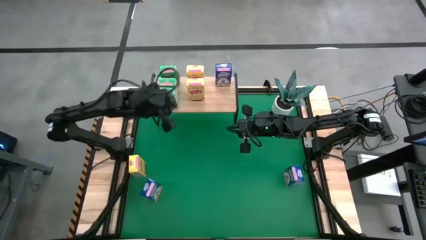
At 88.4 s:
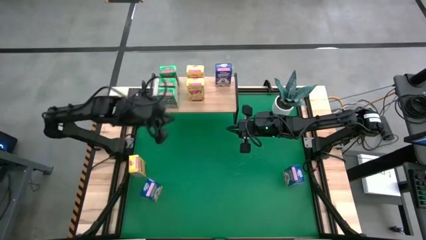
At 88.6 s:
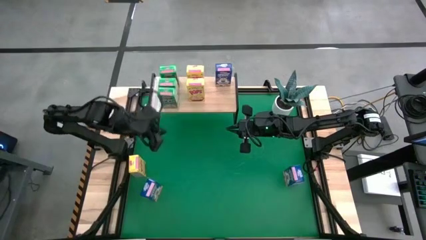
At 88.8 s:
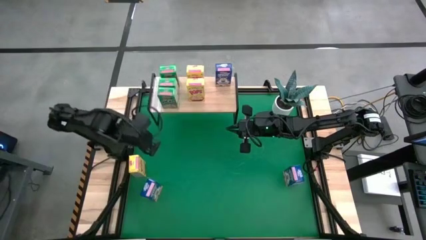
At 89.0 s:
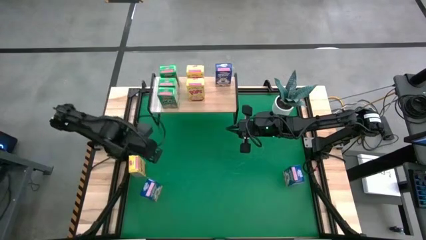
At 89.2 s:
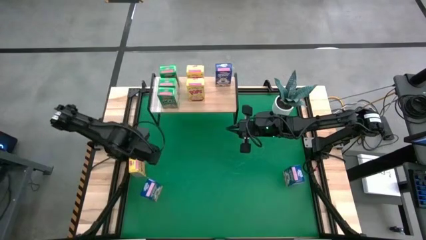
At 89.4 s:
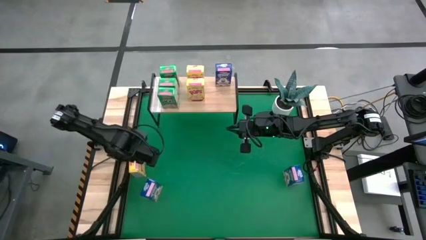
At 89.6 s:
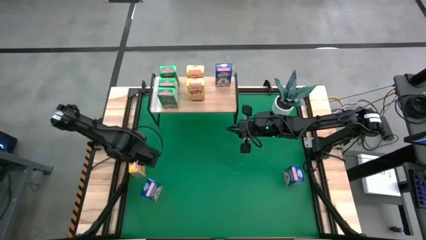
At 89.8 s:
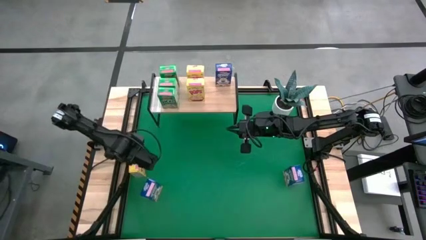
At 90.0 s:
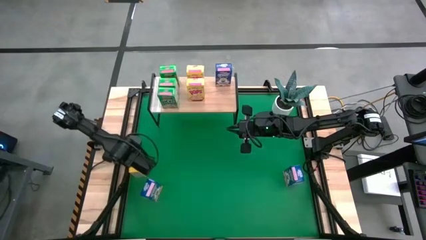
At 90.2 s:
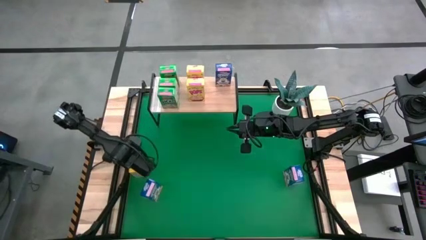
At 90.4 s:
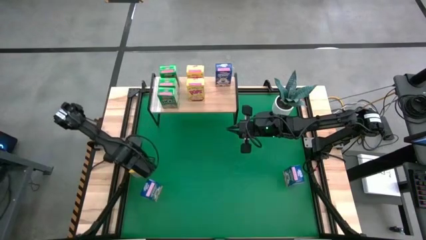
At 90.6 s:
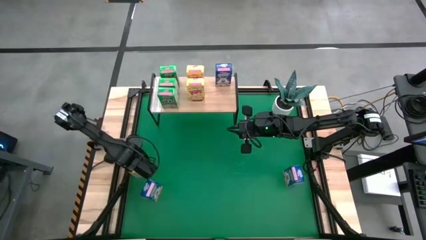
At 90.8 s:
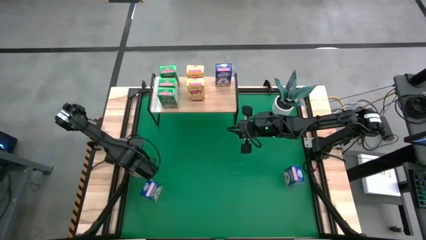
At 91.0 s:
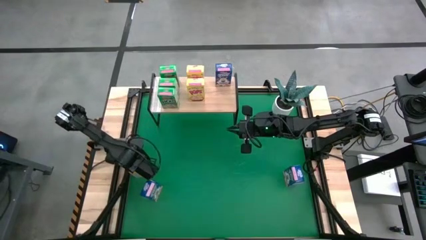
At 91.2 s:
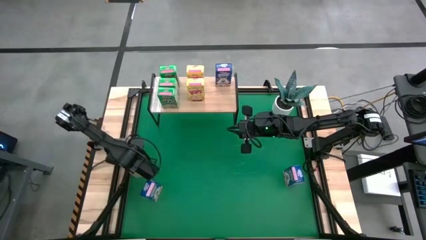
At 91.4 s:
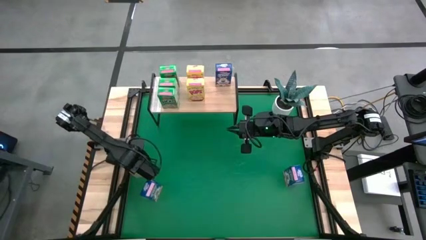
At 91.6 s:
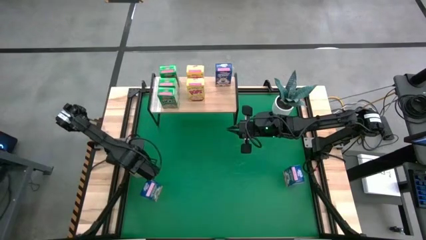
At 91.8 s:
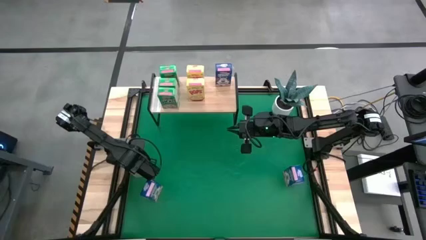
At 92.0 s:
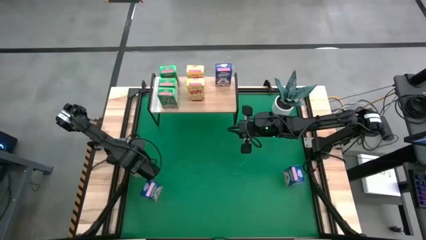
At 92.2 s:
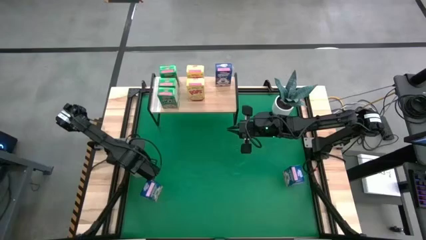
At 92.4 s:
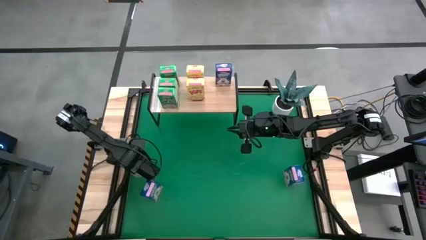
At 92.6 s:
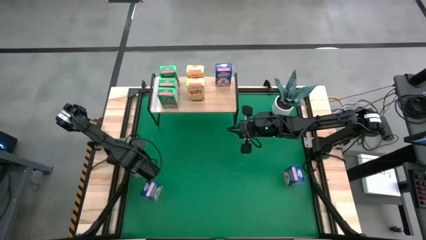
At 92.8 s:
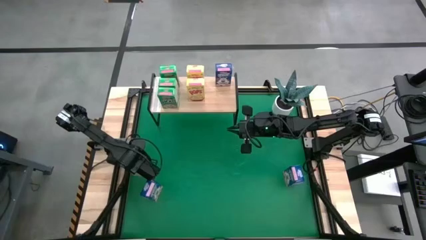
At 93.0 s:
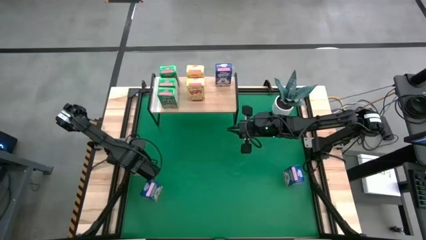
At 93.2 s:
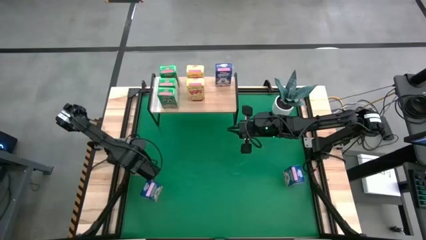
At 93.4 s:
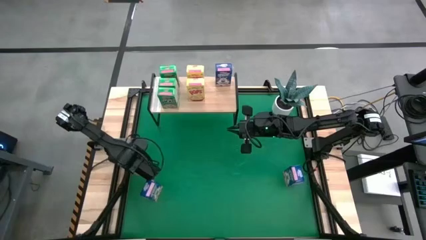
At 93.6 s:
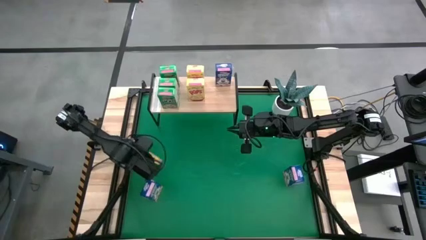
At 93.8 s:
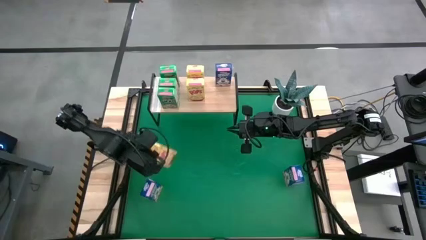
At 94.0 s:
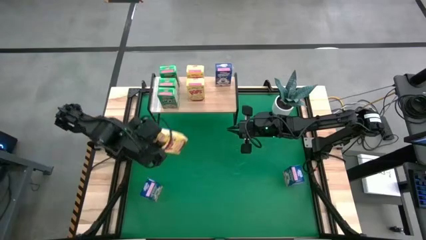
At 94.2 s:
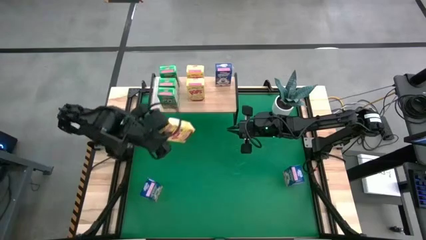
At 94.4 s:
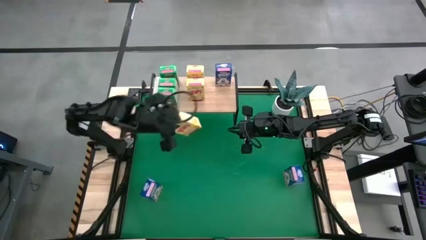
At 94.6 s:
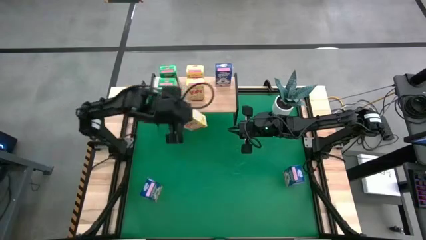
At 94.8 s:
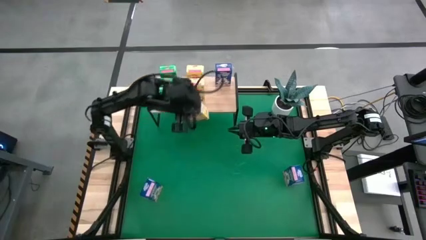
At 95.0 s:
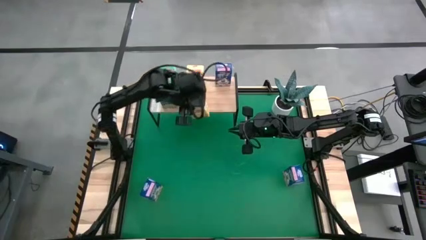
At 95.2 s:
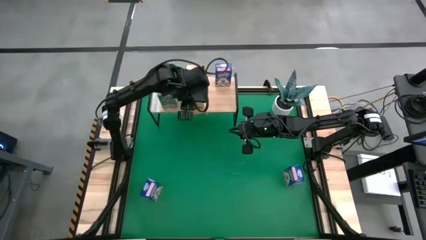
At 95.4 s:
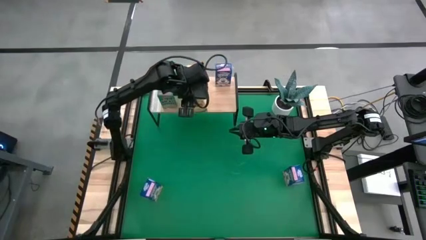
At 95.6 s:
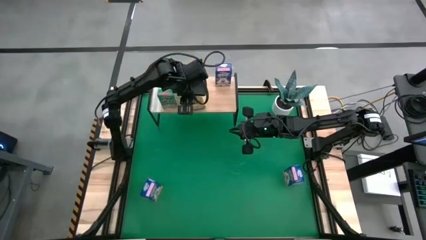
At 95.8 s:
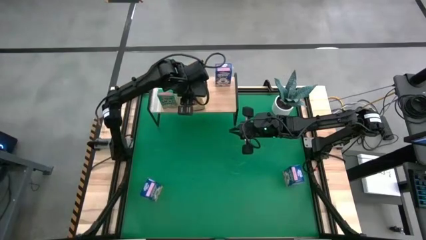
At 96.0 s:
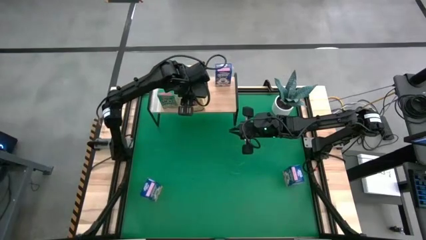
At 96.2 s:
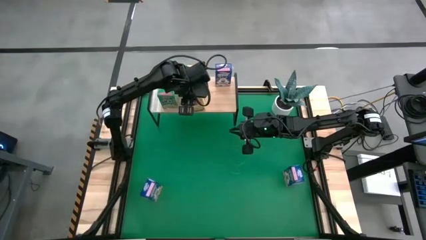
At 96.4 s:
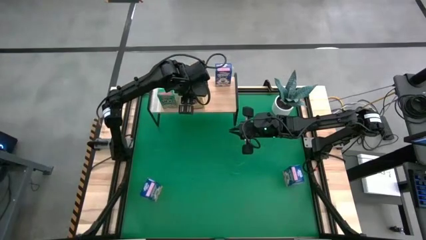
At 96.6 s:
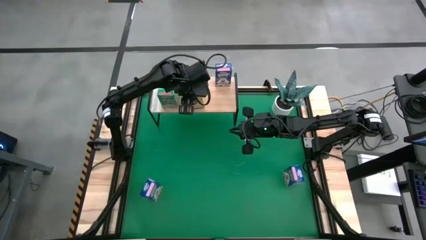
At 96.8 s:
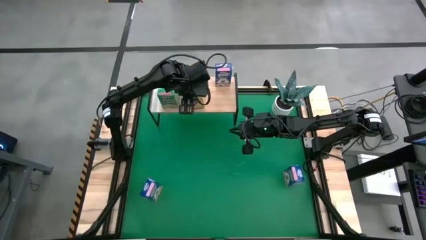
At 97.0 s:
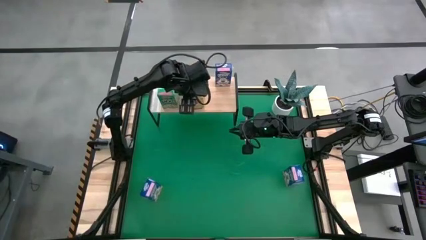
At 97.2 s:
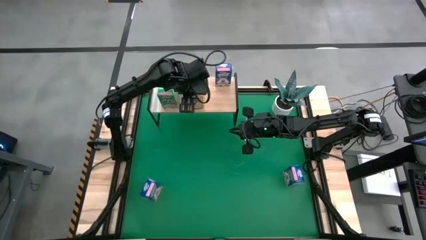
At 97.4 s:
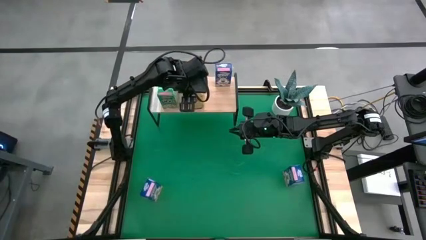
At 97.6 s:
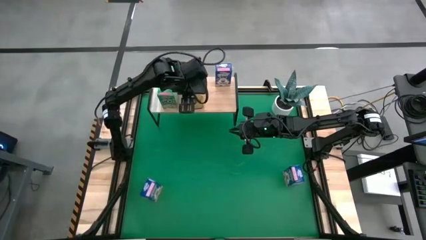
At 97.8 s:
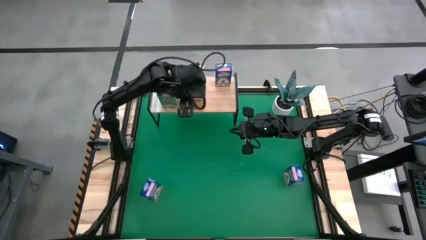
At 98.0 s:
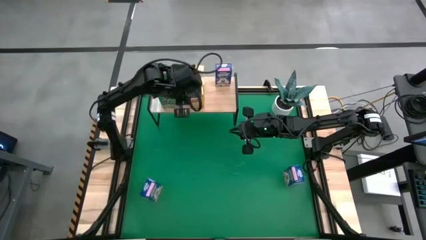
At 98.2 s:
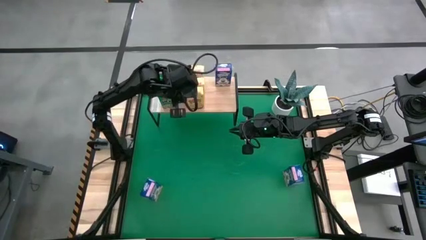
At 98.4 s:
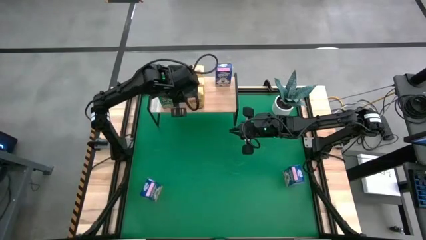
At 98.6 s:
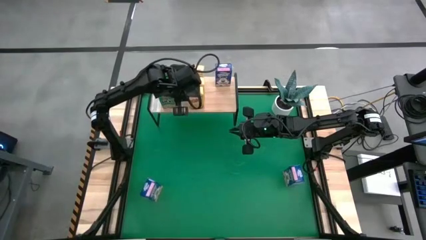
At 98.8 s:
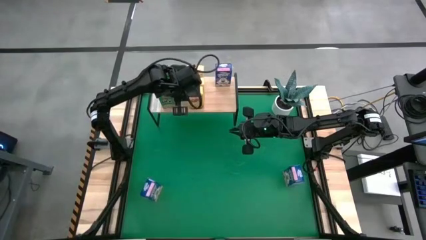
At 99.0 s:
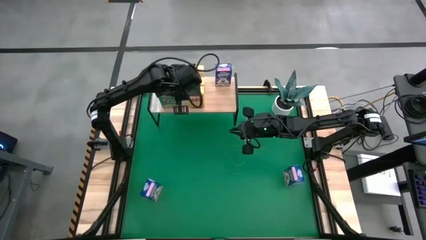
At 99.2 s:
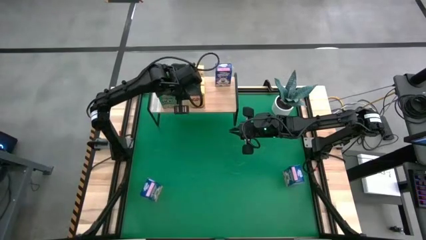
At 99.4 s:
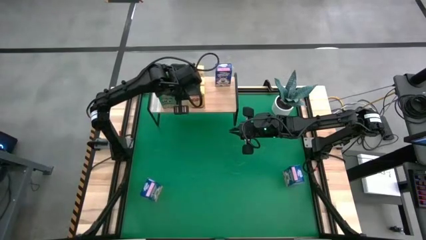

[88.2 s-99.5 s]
Task: Stack cereal on shelf
Put the yellow cereal box on the shelf aligned with the other yellow cereal boxes

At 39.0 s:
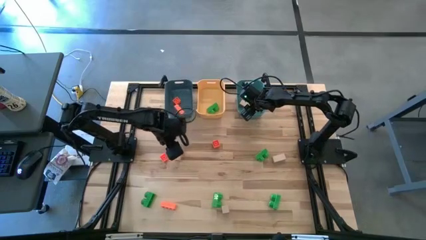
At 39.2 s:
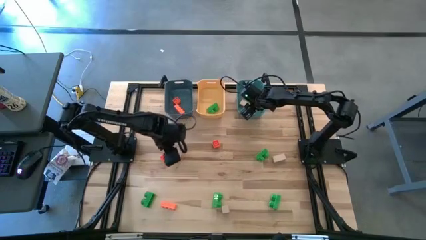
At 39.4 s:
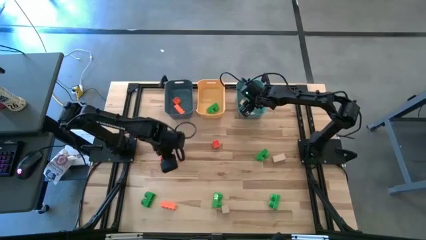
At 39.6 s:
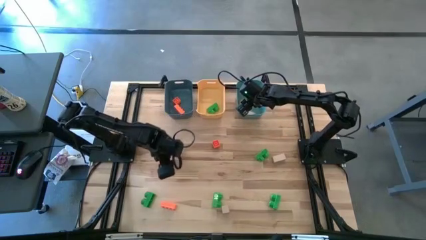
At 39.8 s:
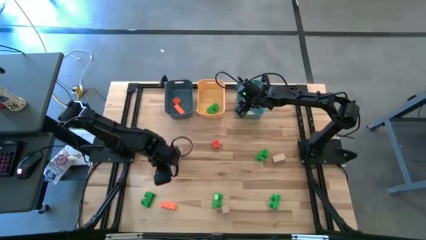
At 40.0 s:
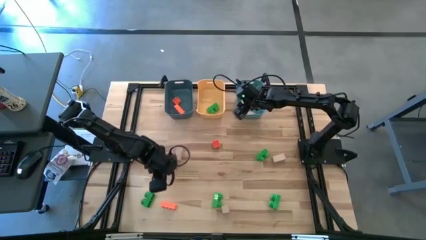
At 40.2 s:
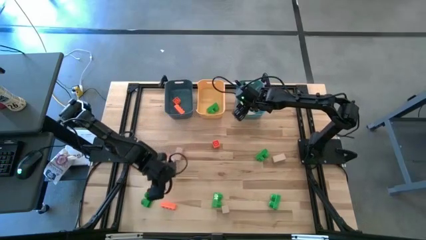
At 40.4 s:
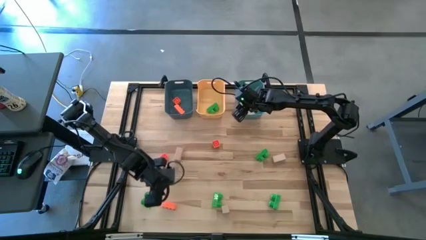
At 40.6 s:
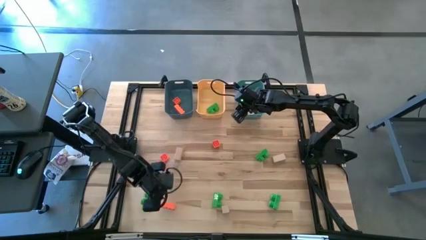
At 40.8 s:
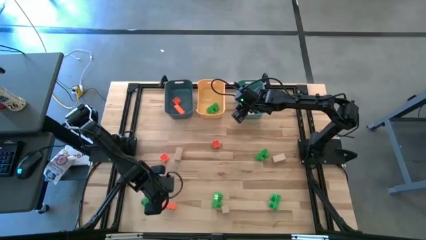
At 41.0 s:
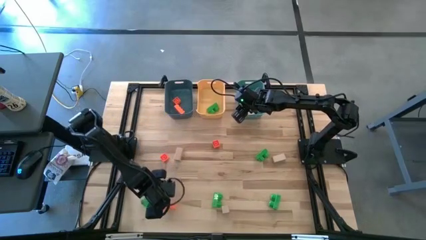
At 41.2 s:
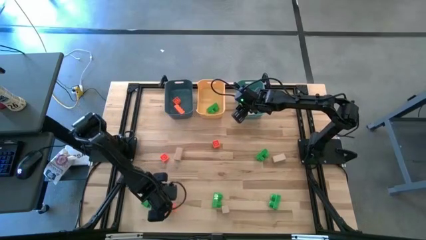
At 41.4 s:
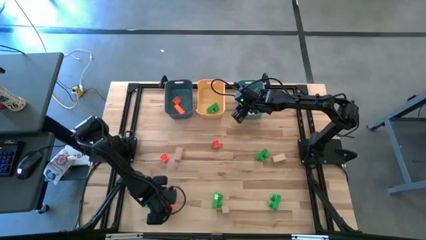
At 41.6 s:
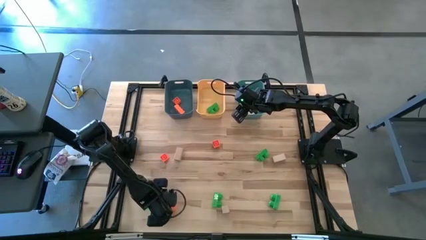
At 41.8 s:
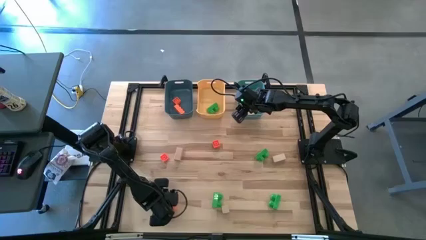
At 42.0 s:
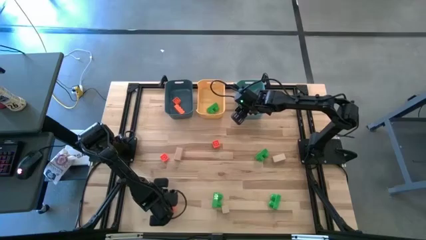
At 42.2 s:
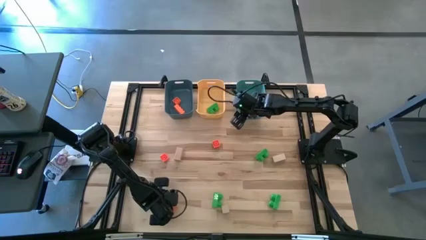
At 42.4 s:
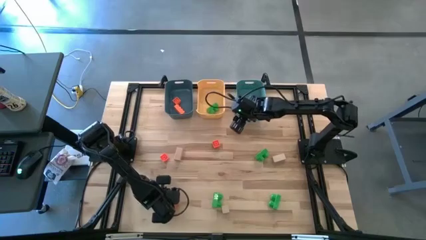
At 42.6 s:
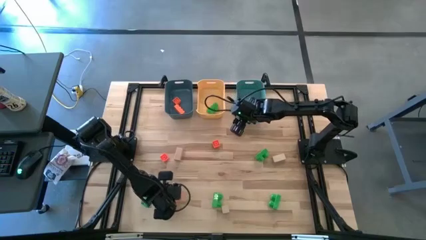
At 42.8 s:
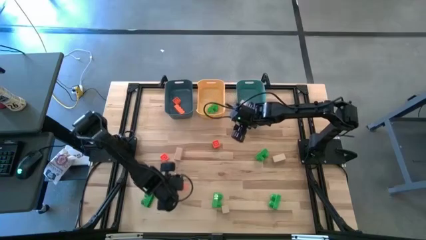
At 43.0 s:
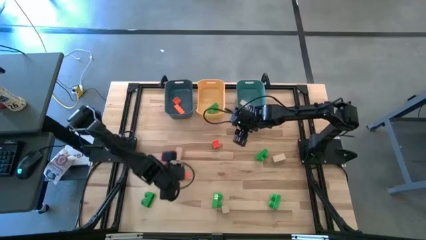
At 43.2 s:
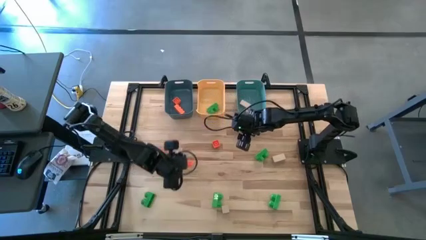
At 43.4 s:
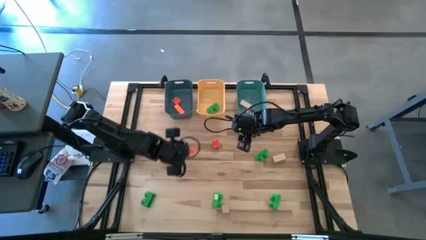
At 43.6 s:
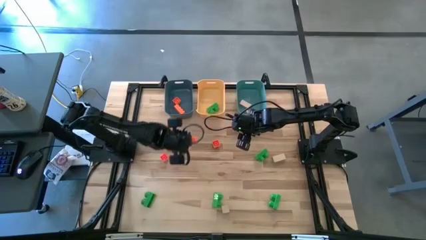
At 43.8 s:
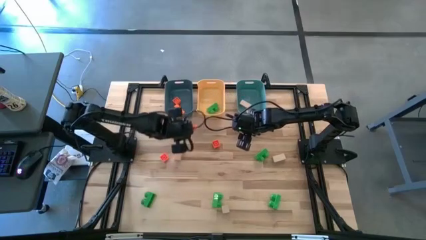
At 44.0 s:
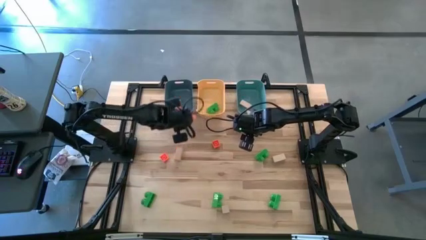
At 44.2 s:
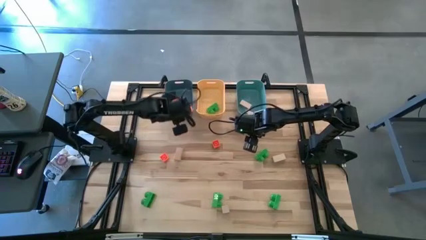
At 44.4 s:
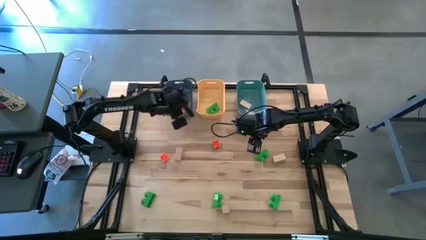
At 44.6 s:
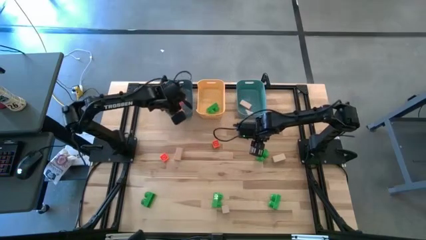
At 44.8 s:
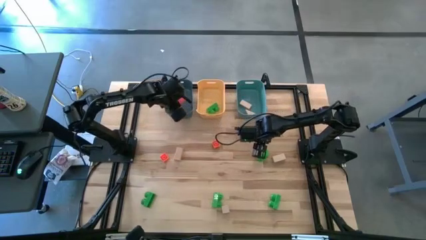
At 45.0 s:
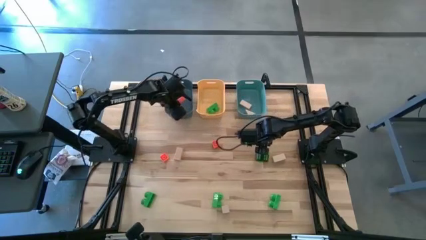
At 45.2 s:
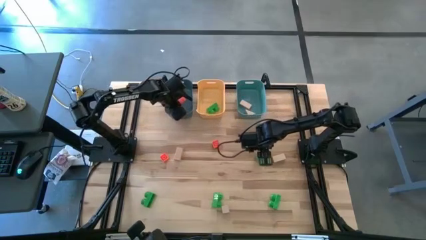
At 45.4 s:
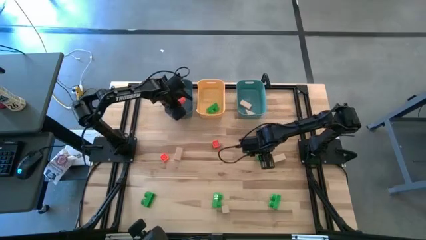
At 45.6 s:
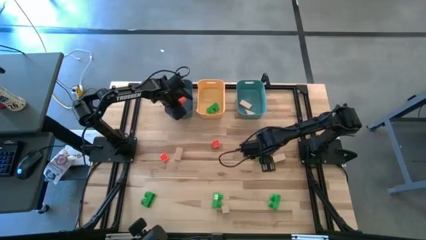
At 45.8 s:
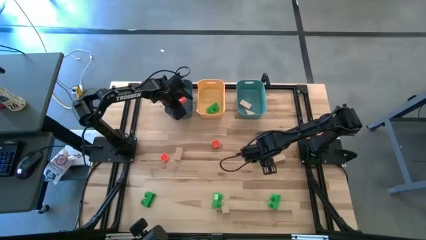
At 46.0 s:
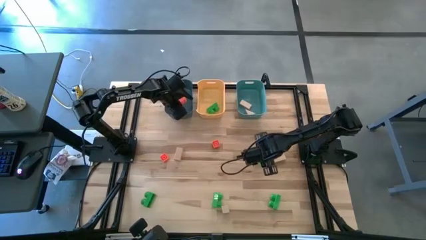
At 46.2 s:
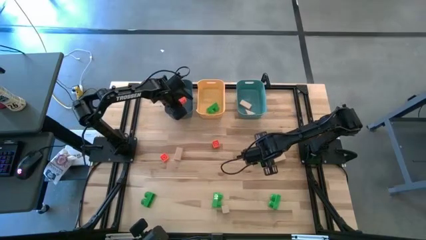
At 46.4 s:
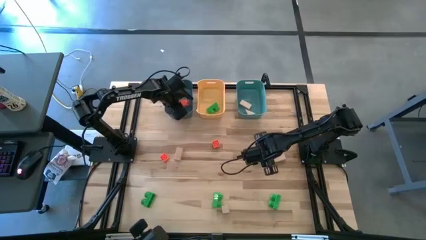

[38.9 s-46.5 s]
Task: Sort & place blocks by color
Put the orange game piece into the blue bin
